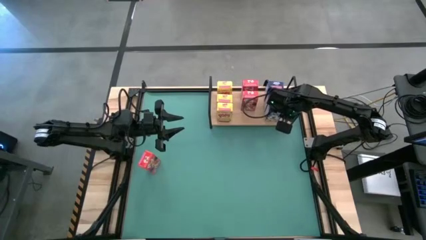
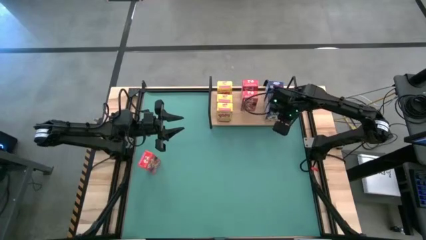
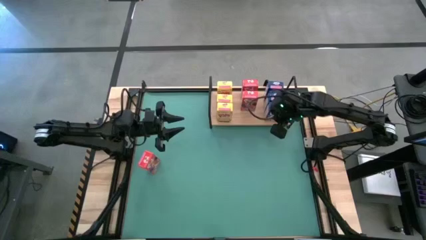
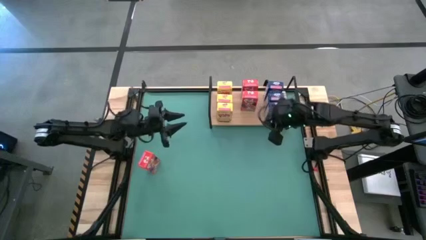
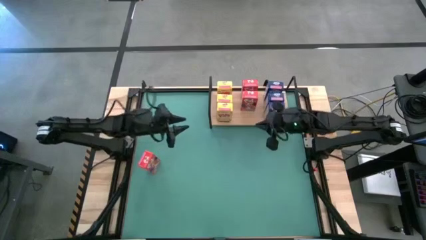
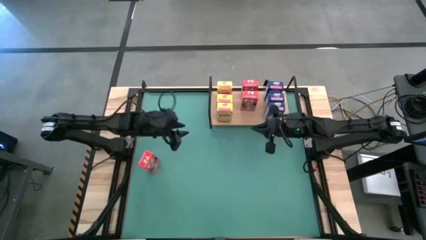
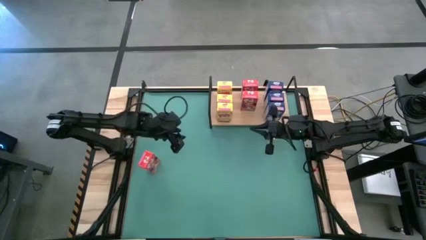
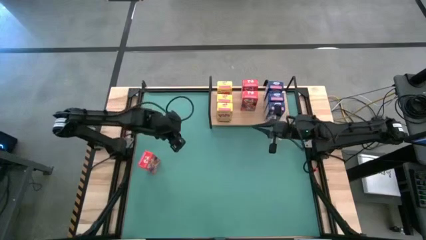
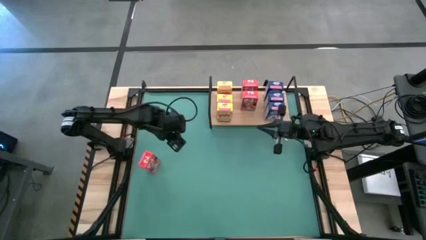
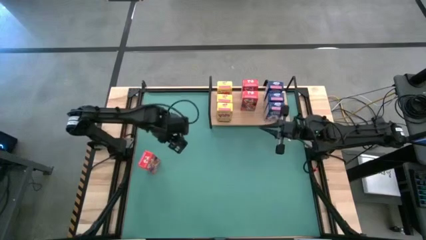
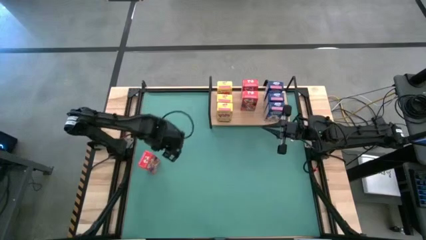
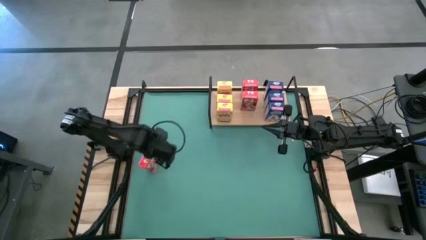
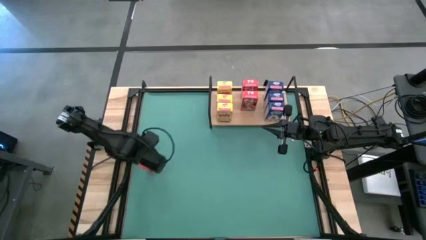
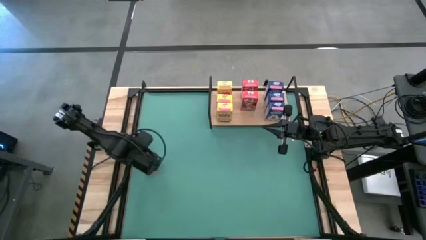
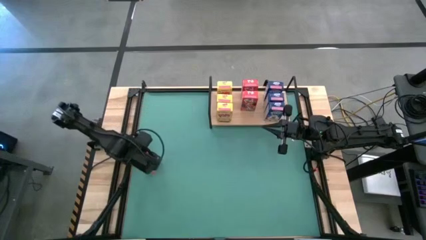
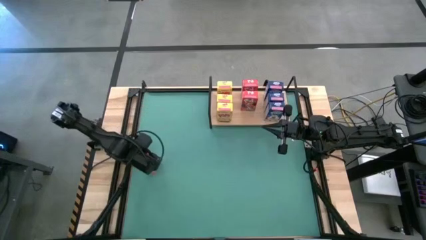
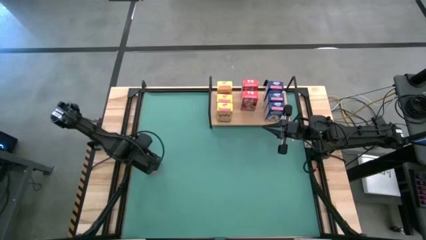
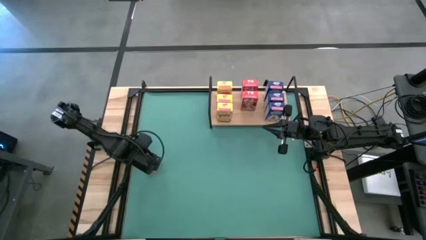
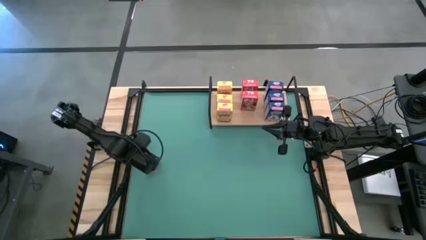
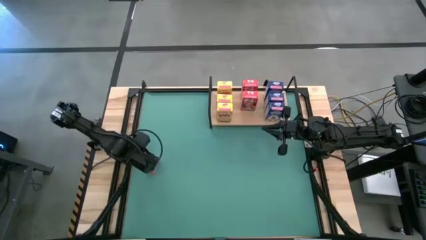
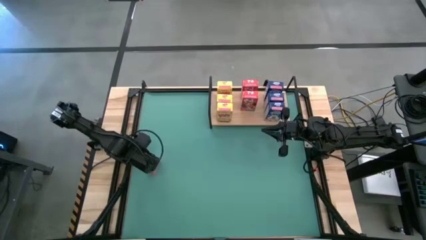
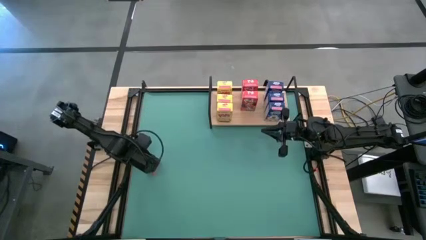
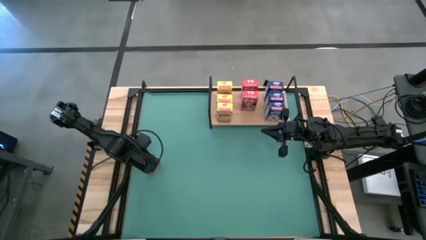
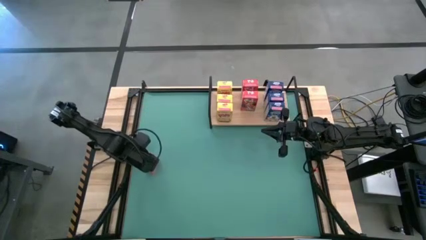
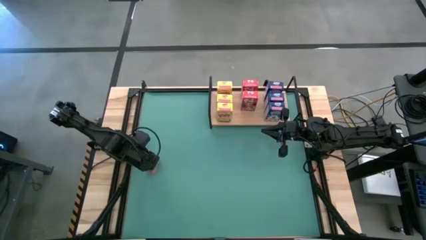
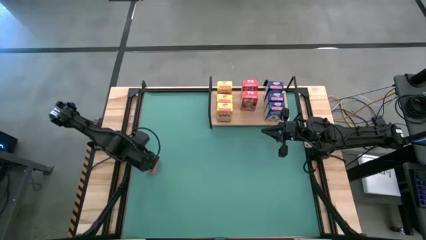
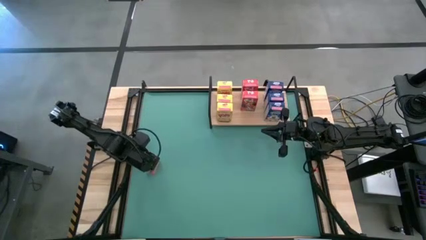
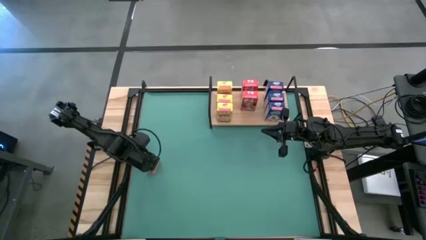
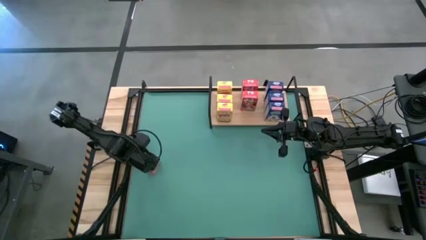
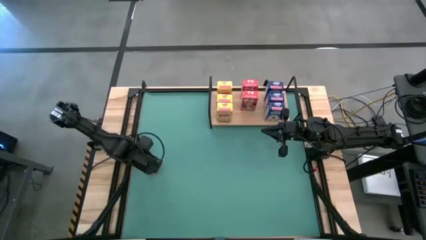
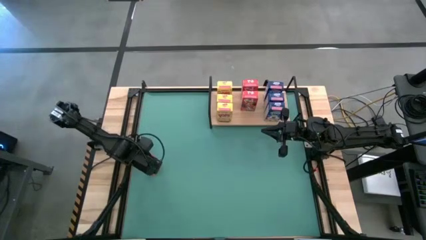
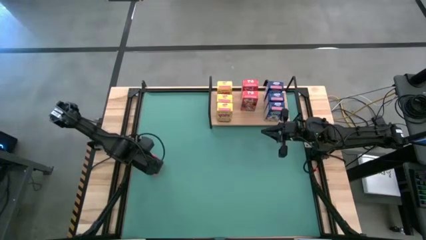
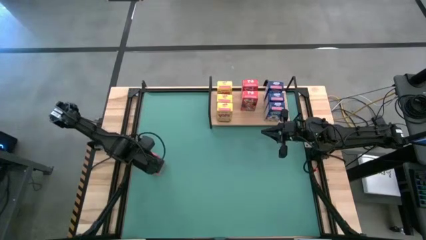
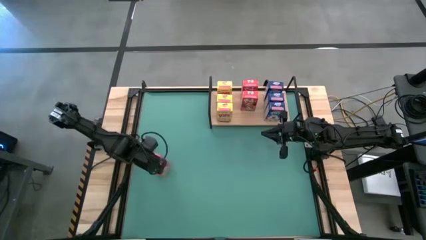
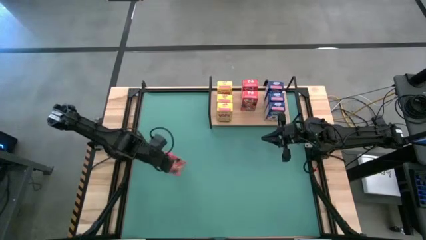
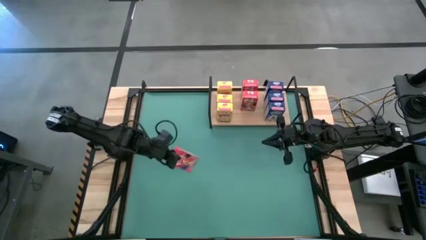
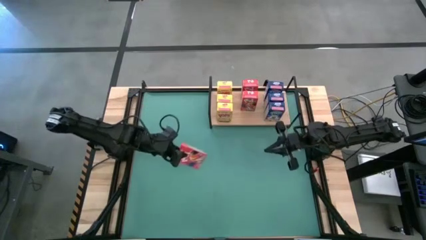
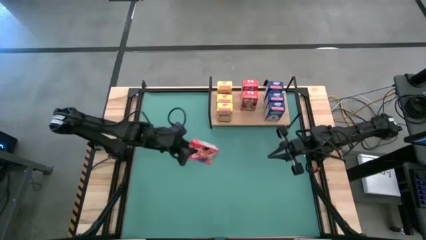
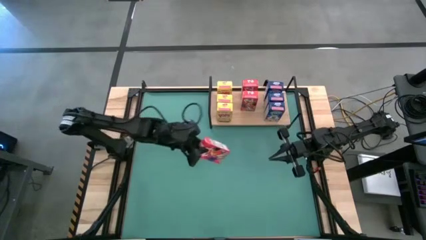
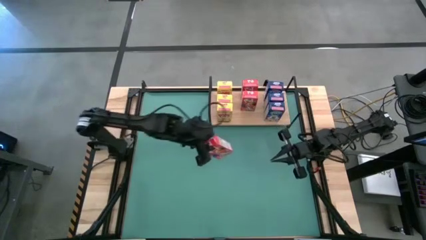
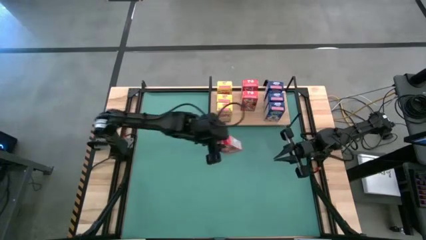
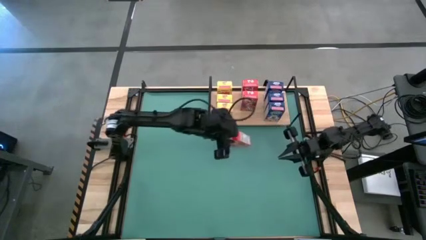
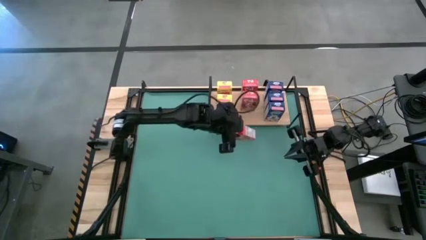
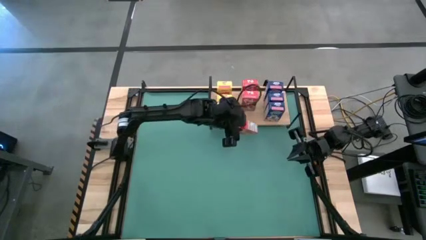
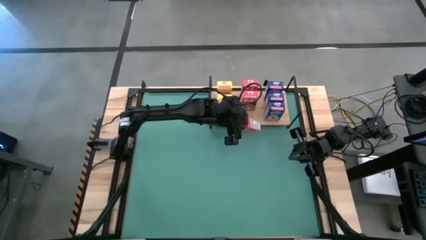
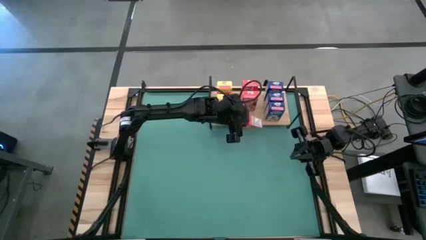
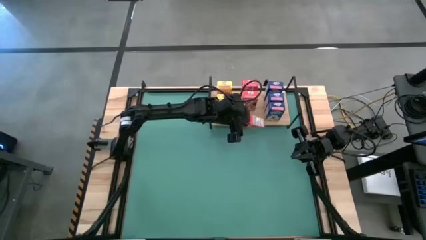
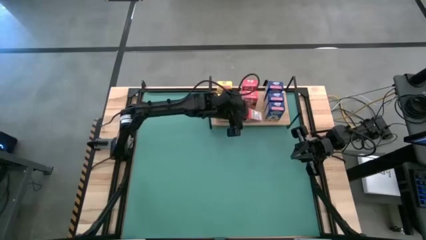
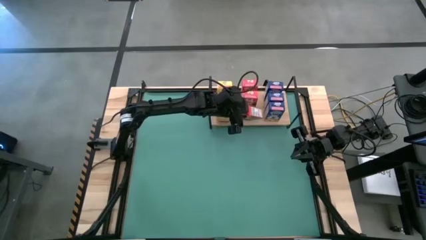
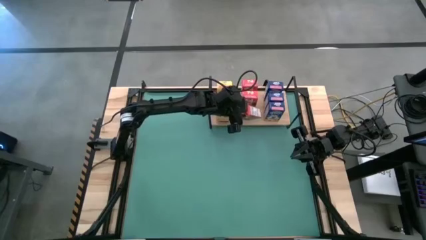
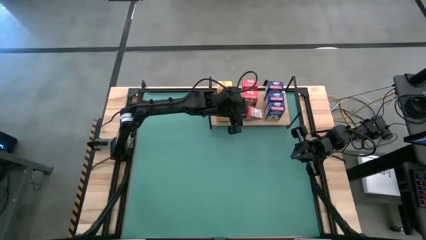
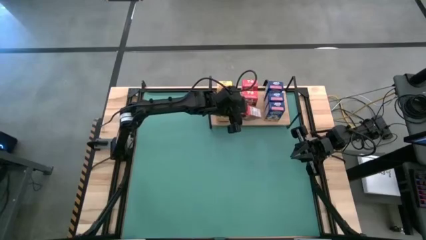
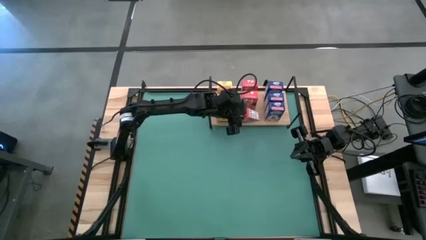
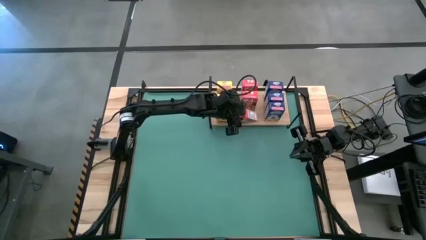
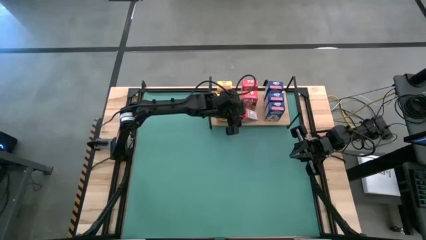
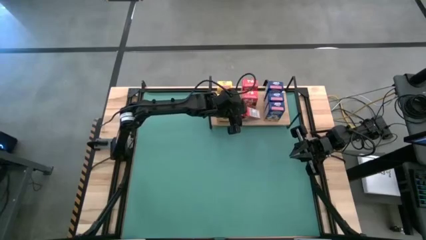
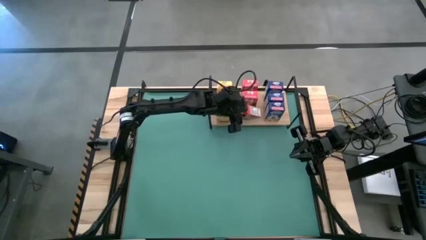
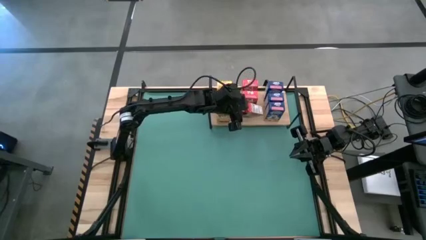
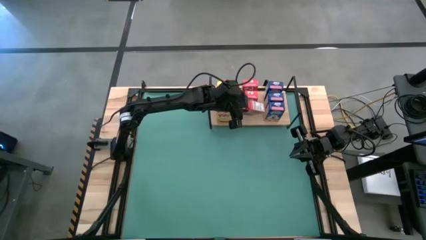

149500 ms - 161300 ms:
Task: Stack cereal on shelf
Put the red cereal box on the shelf aligned with the other red cereal boxes
